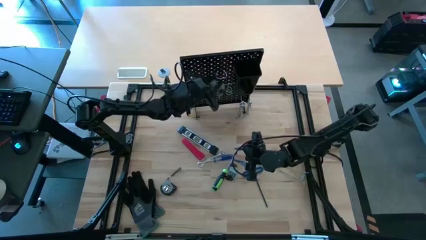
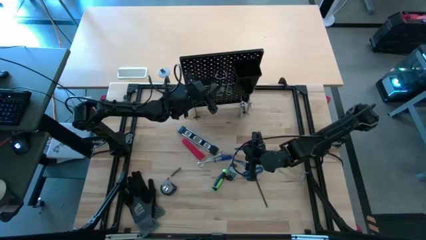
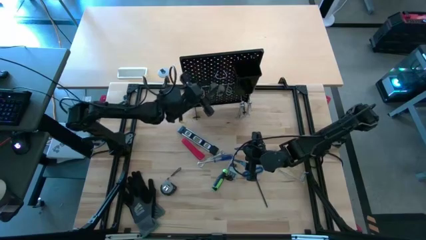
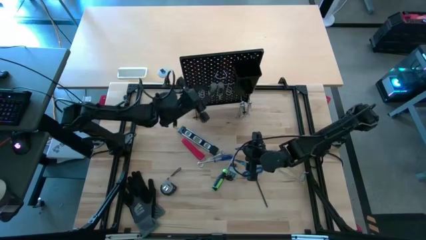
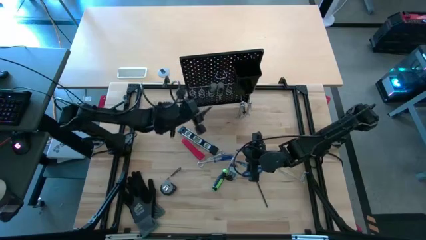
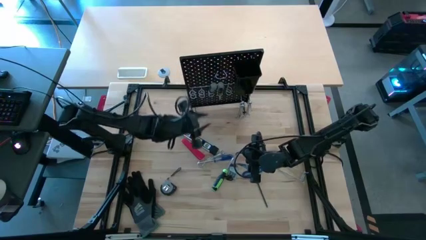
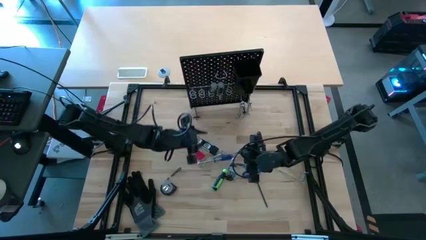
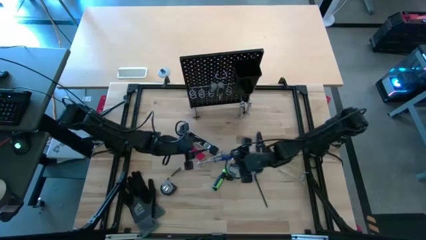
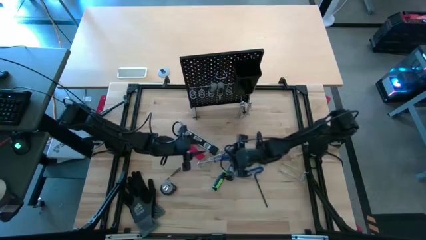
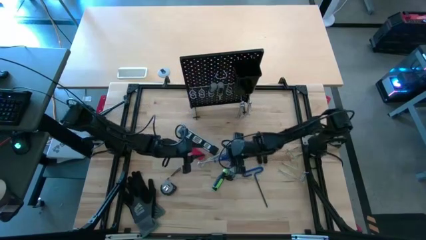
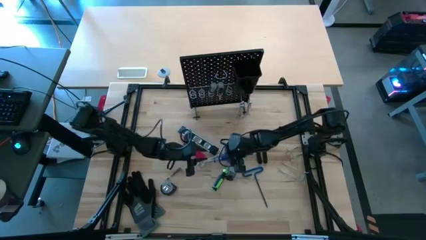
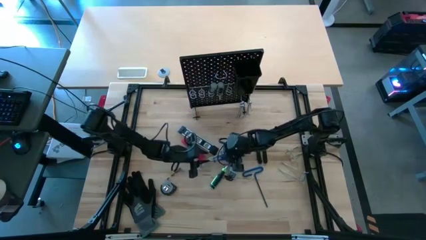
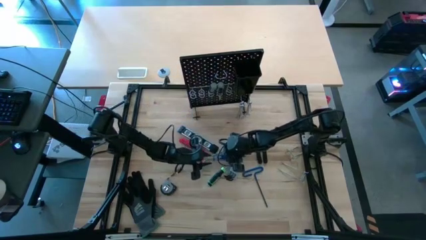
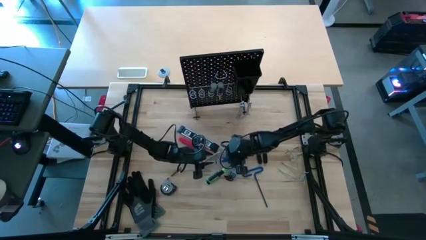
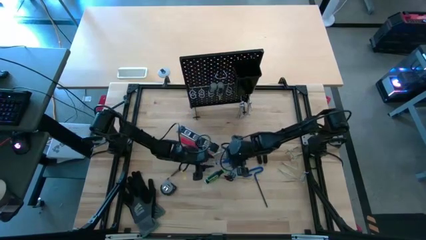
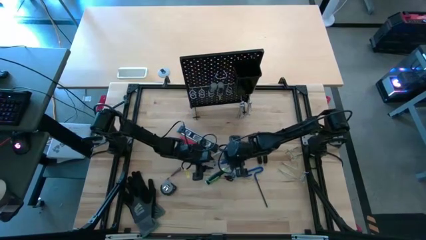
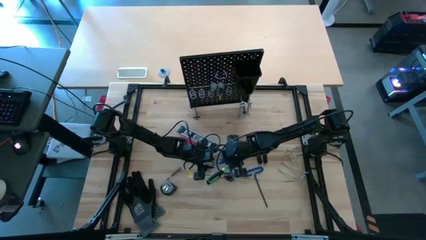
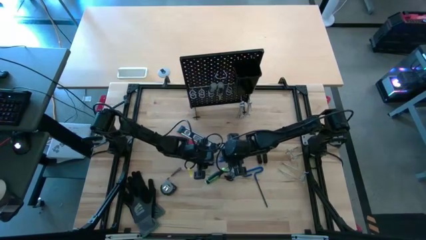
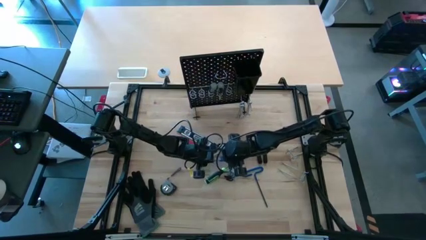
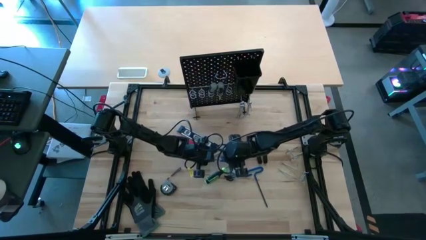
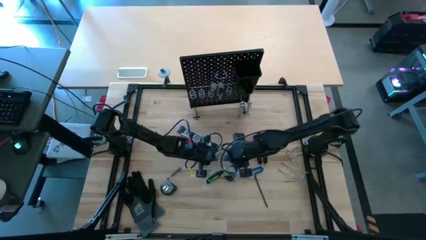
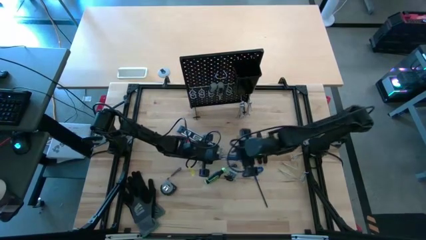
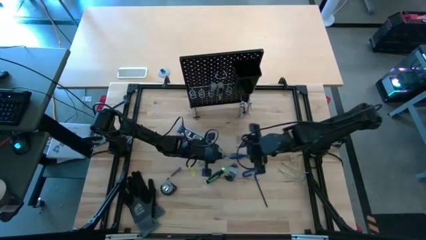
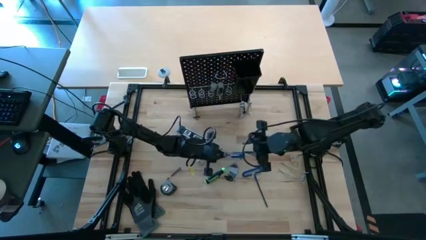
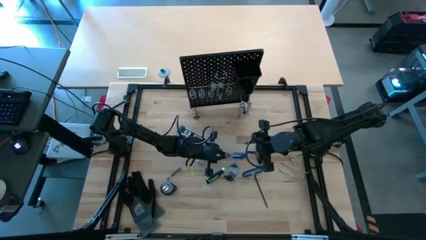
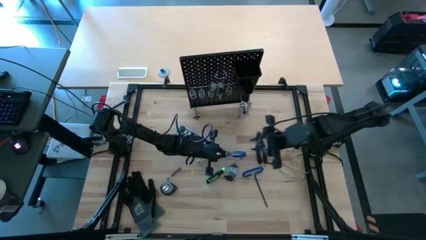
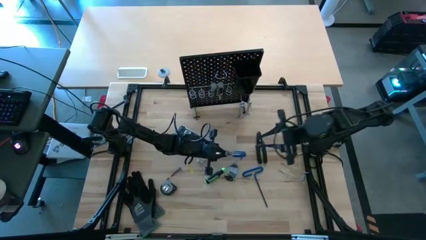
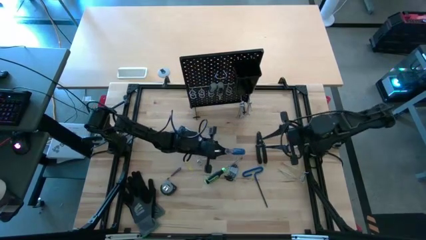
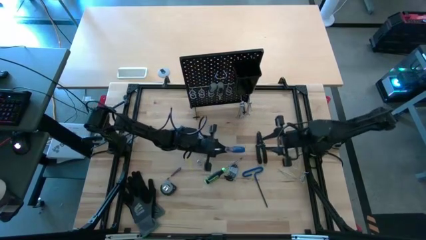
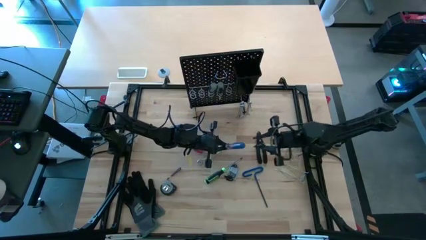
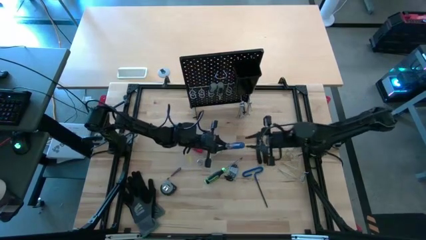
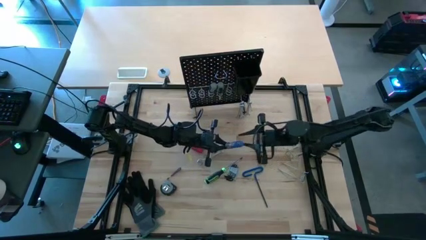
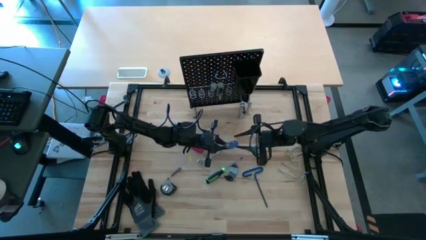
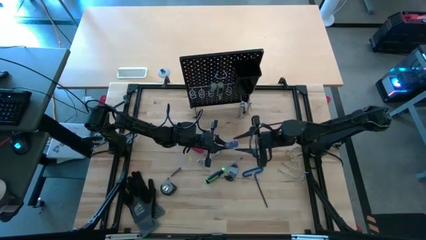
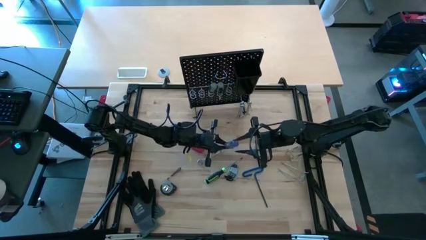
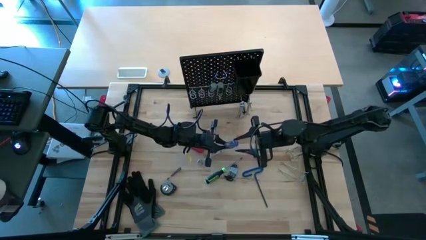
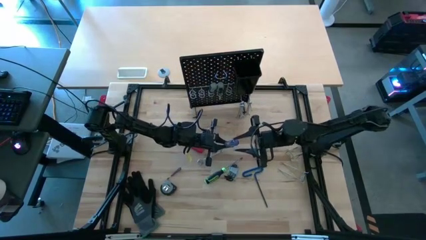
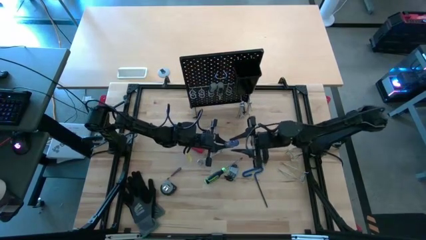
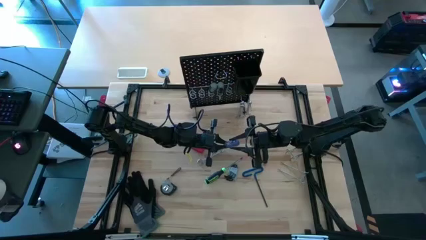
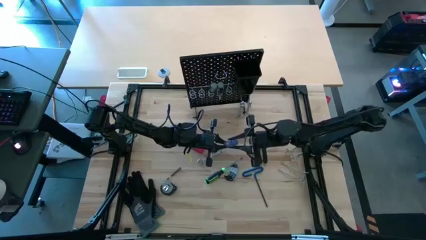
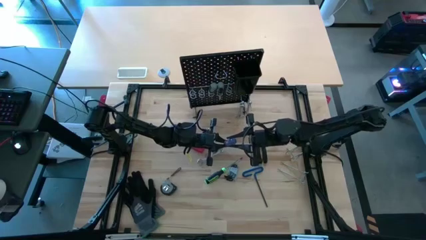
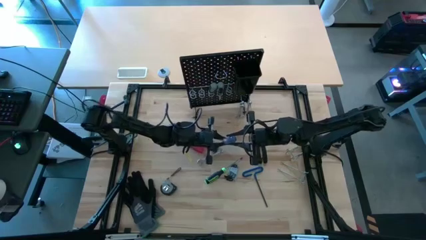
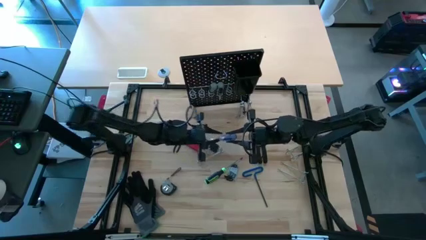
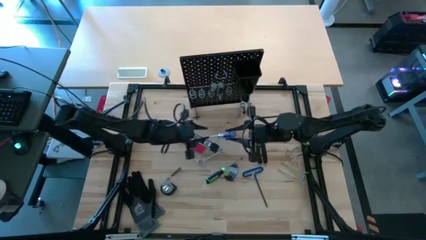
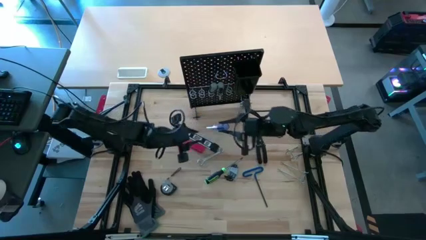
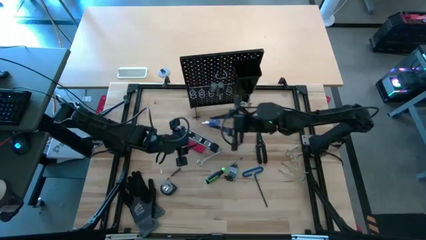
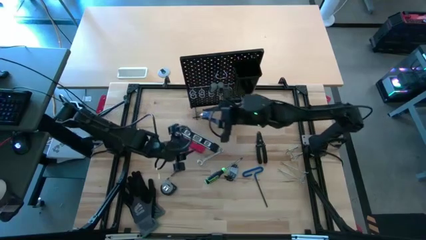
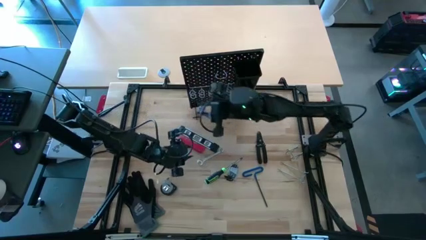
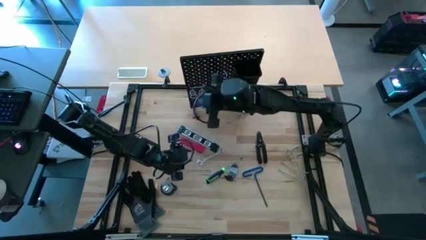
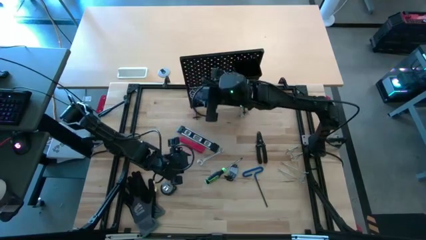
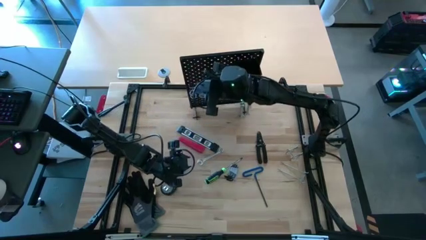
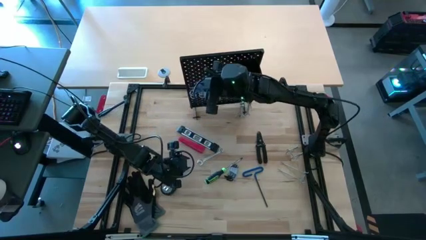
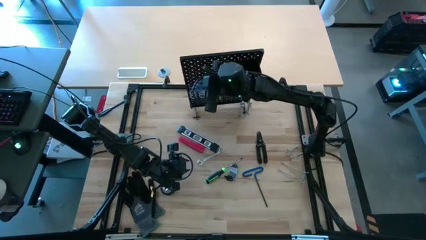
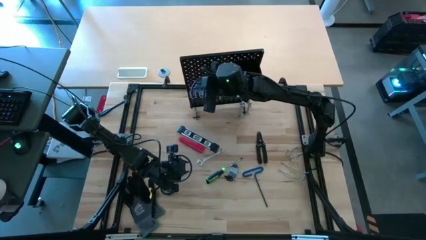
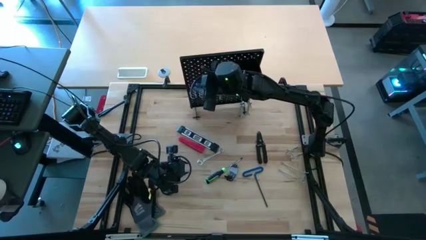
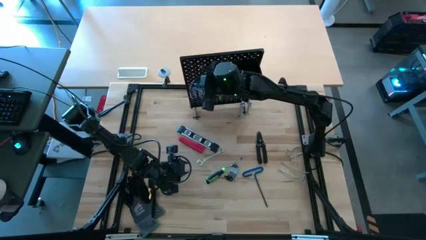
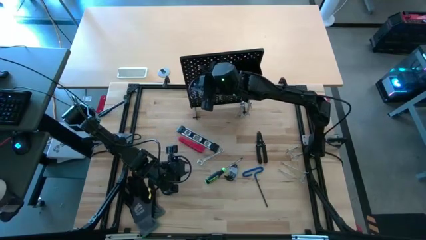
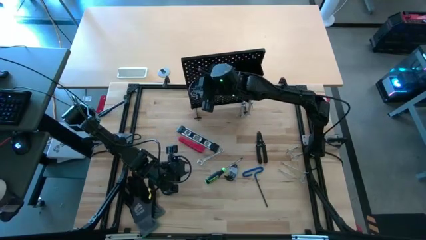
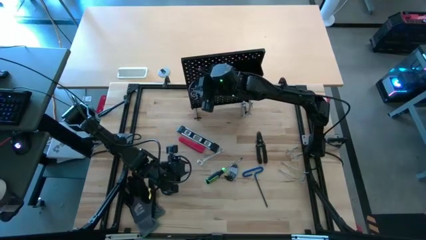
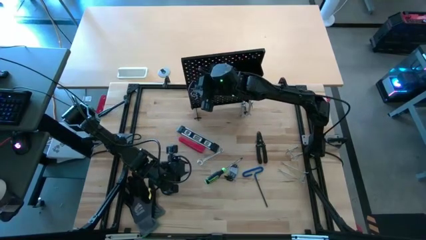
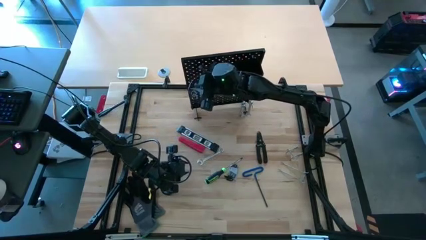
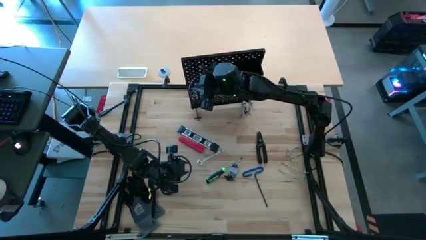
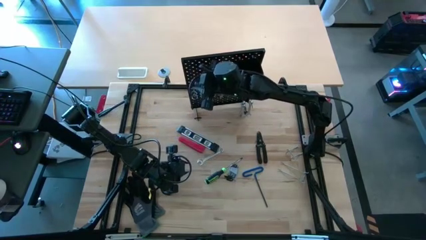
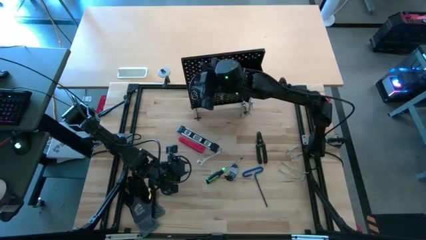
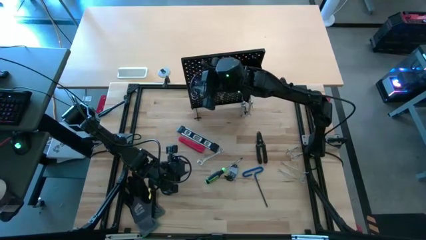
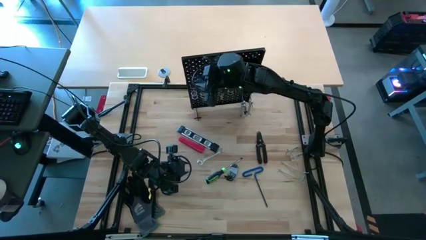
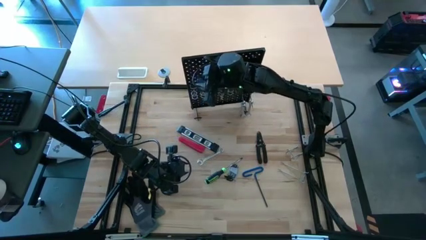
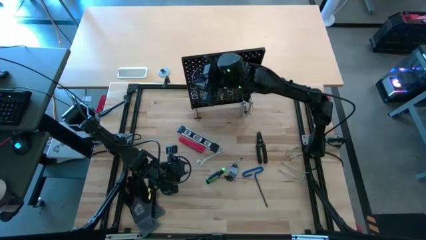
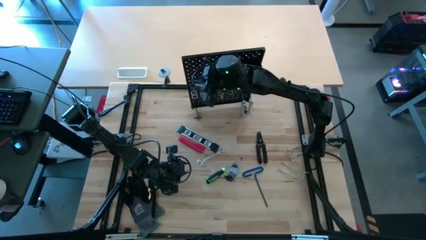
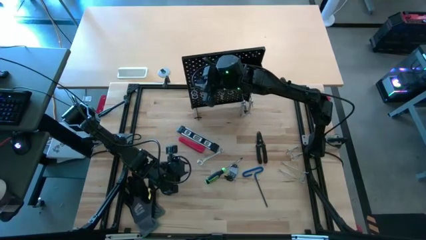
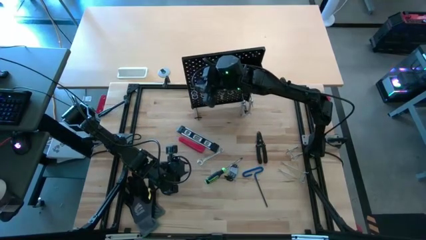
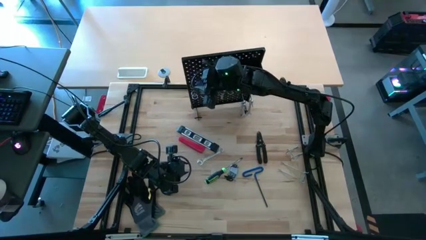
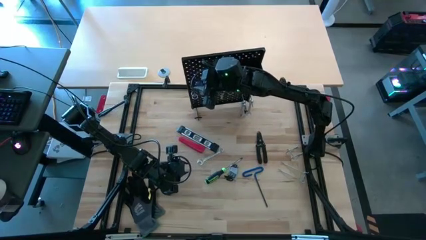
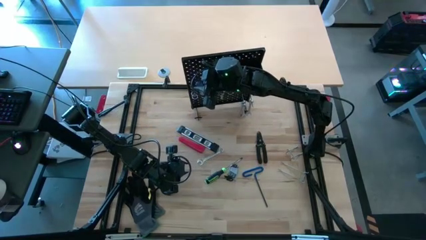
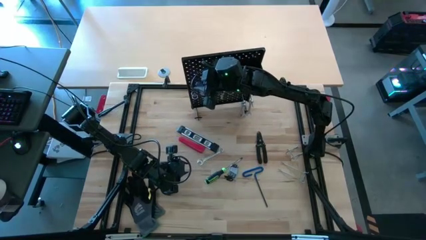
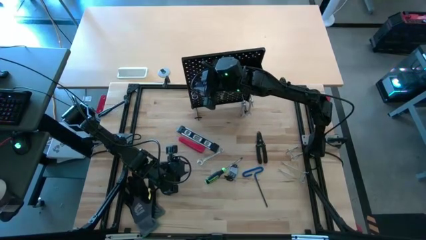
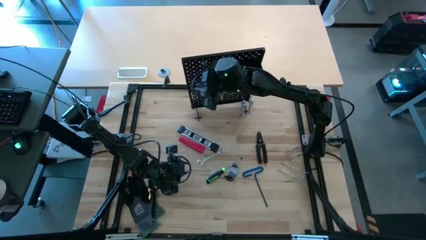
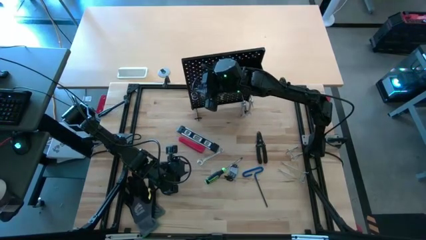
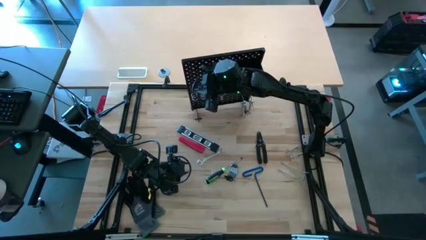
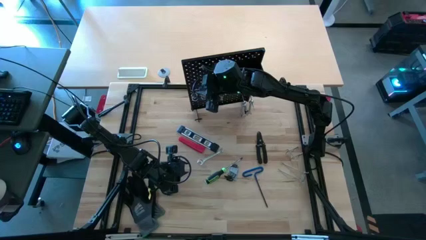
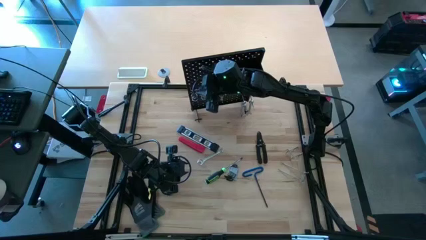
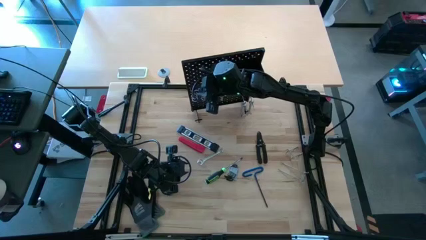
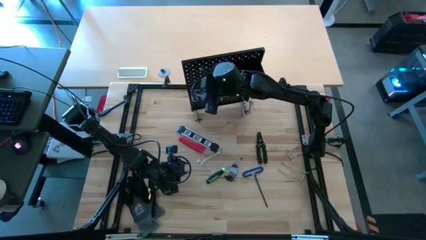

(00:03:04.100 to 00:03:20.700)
Task: Hang tools onto peg board
Hang the blue screwdriver onto the pegboard
